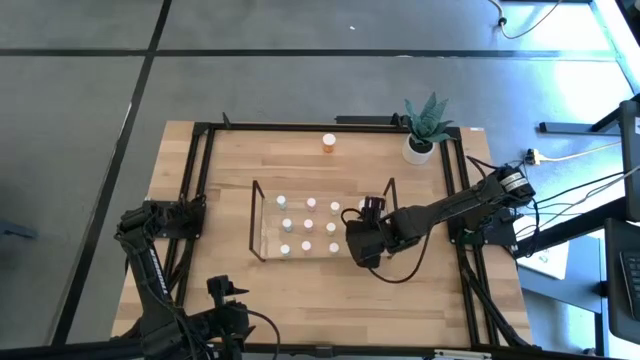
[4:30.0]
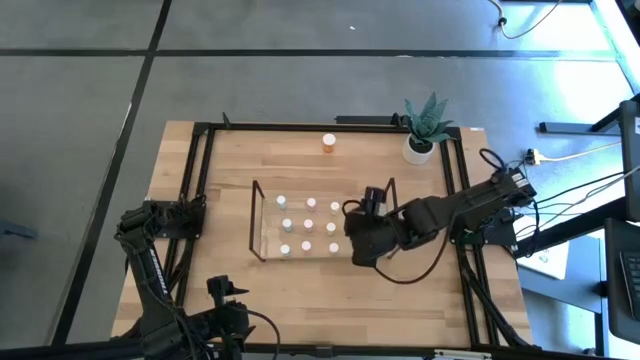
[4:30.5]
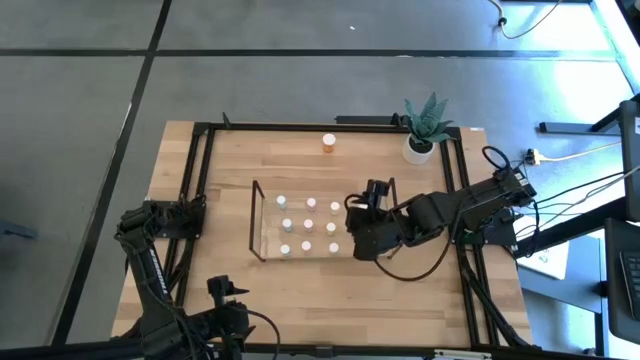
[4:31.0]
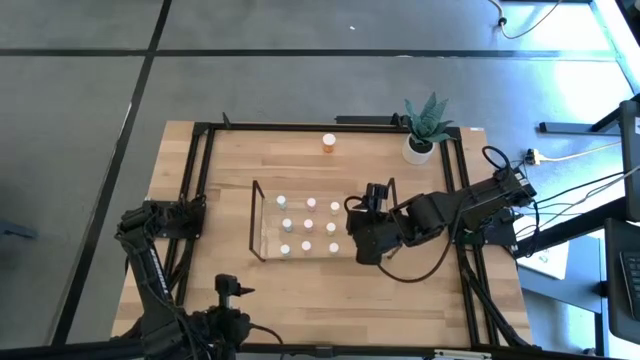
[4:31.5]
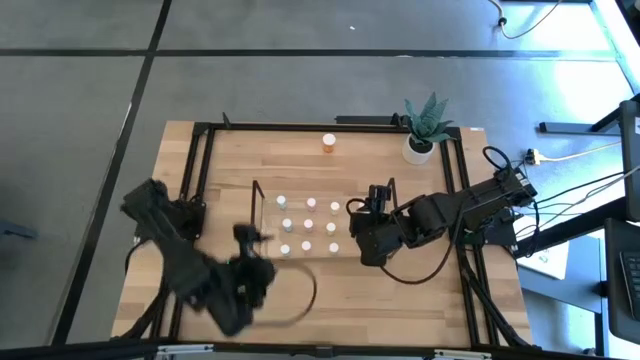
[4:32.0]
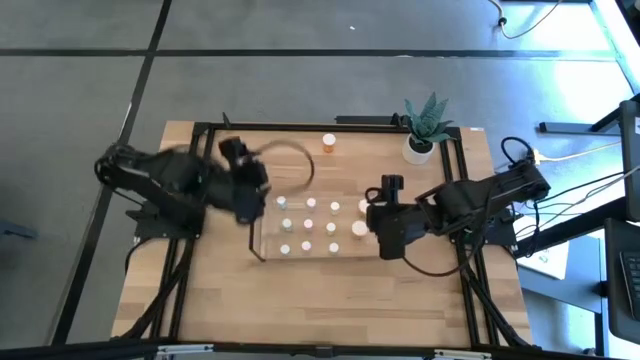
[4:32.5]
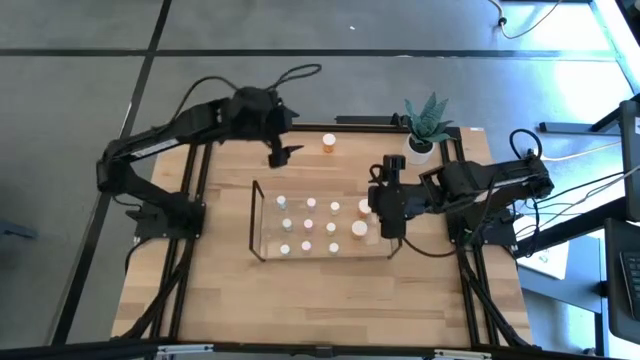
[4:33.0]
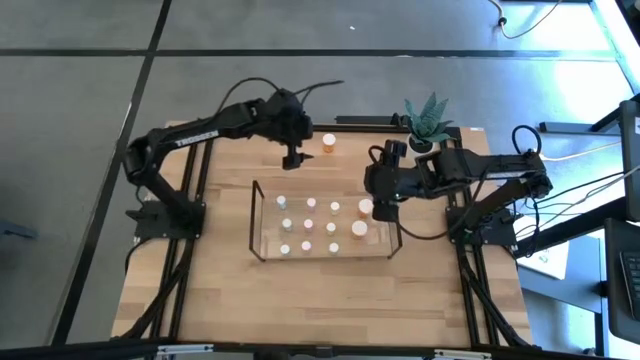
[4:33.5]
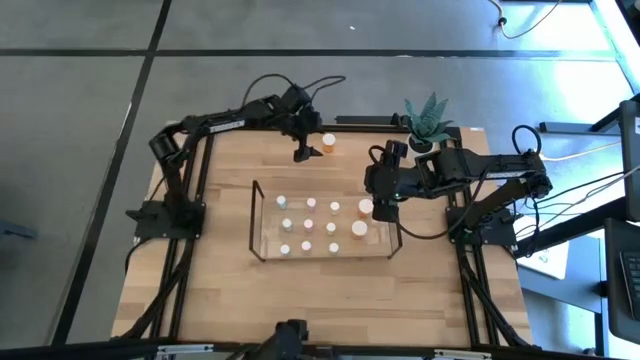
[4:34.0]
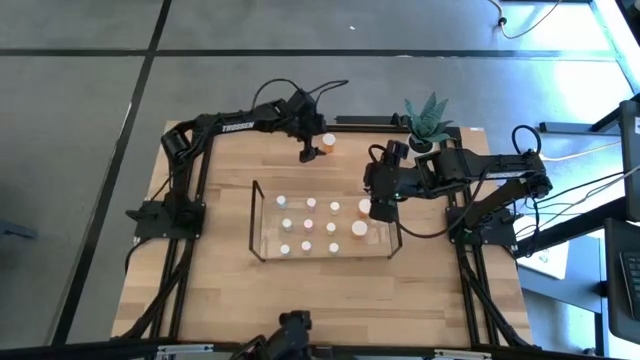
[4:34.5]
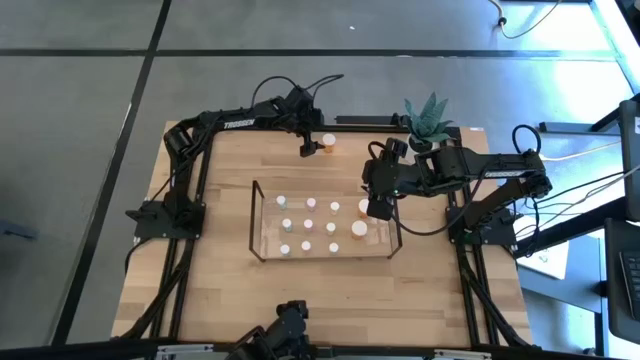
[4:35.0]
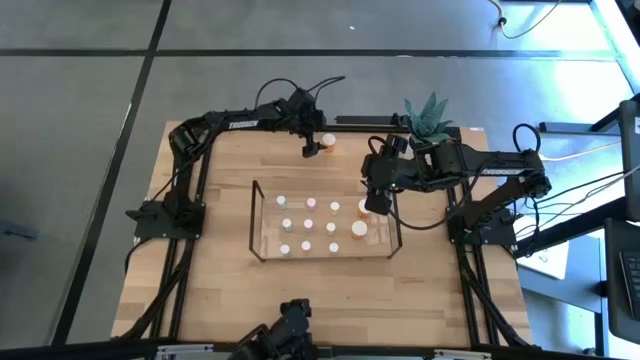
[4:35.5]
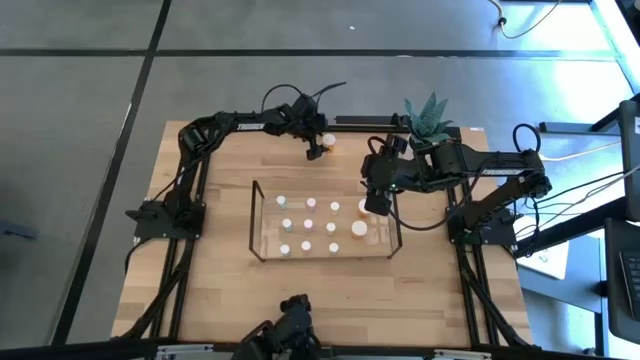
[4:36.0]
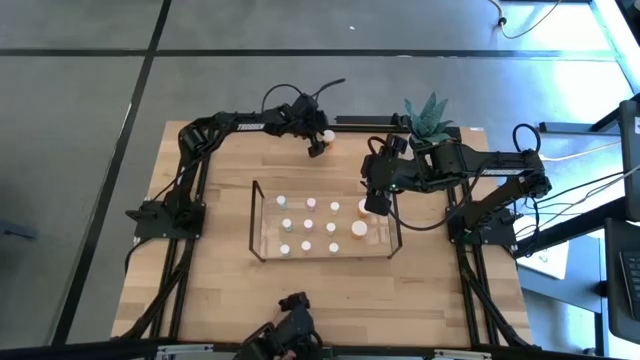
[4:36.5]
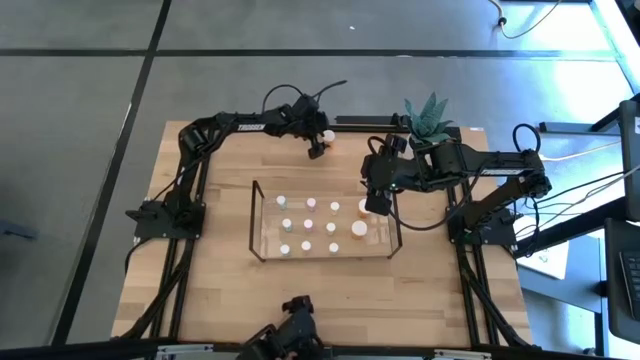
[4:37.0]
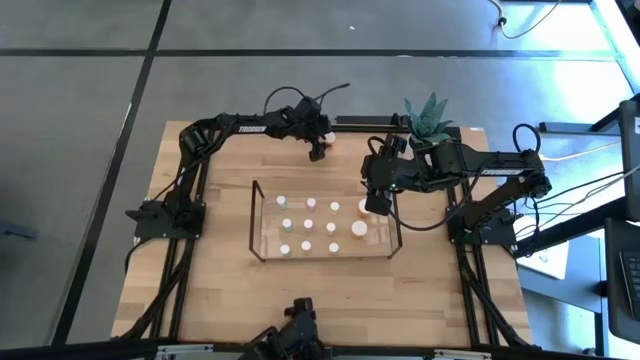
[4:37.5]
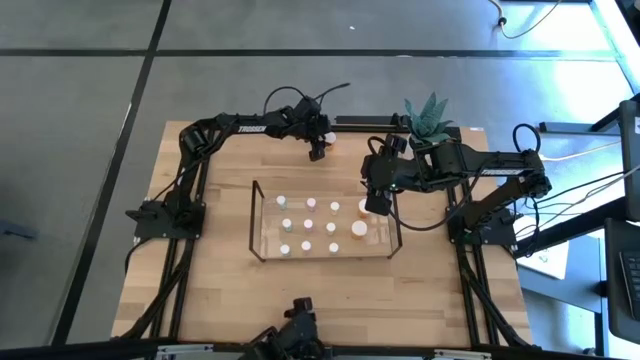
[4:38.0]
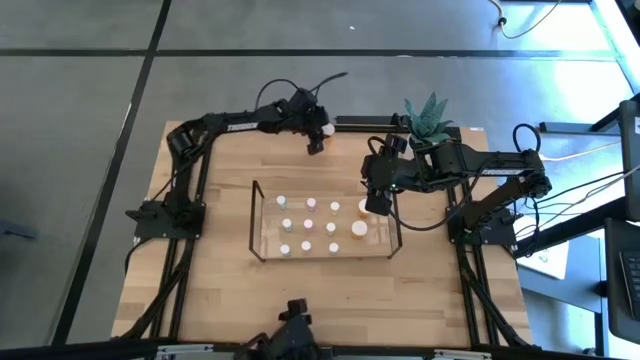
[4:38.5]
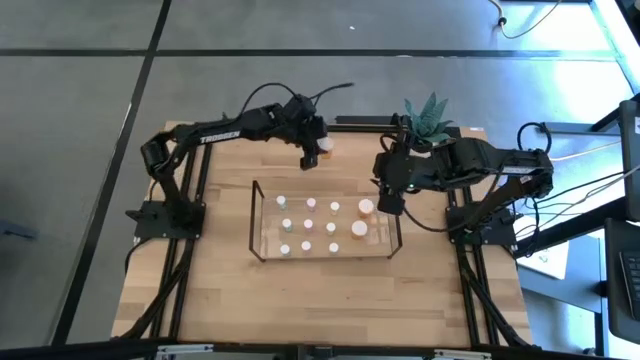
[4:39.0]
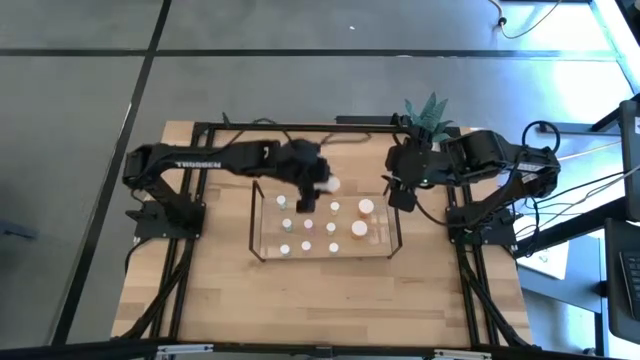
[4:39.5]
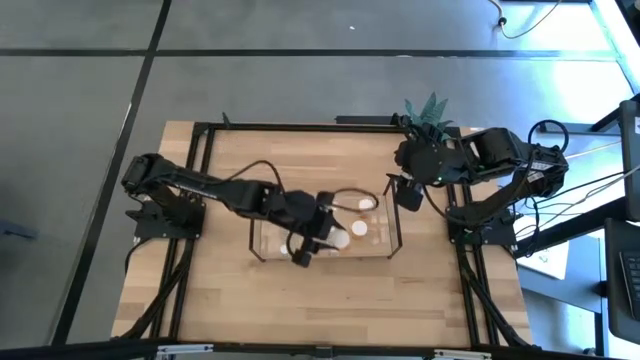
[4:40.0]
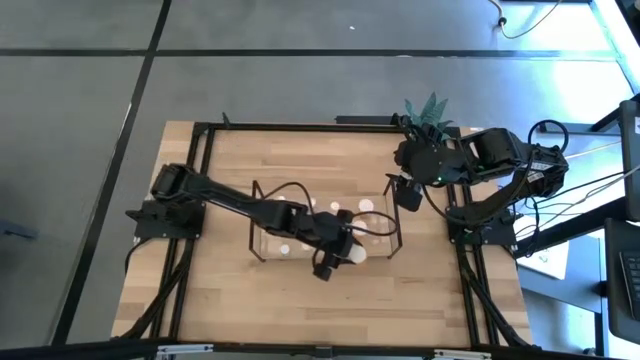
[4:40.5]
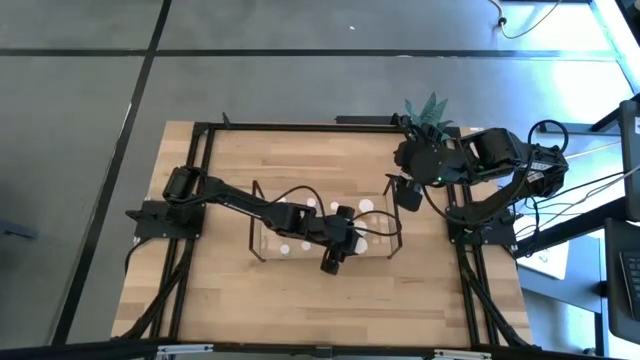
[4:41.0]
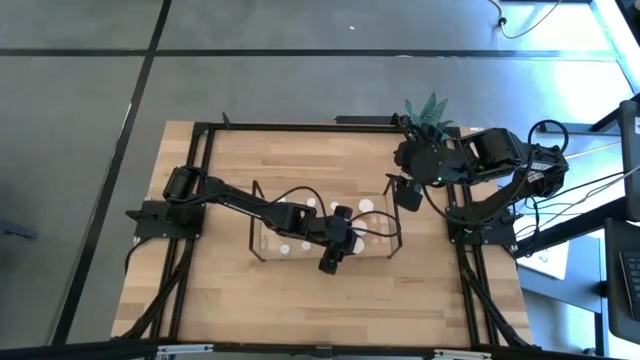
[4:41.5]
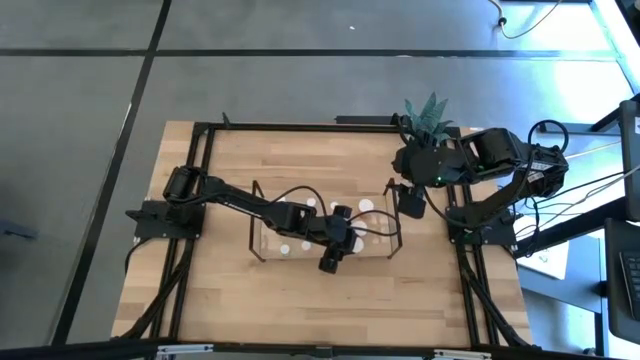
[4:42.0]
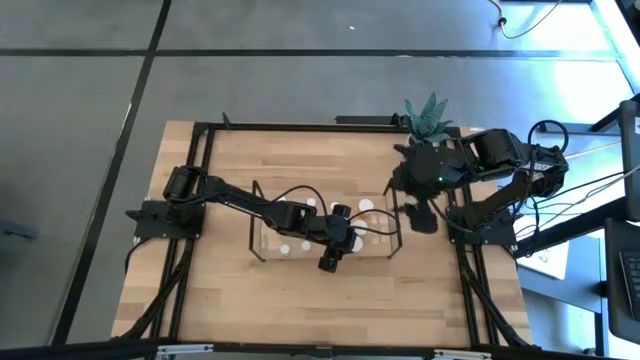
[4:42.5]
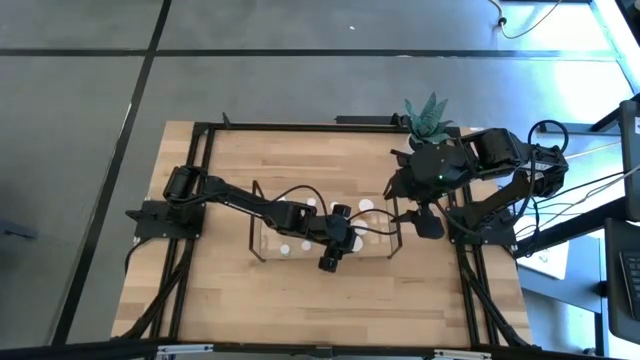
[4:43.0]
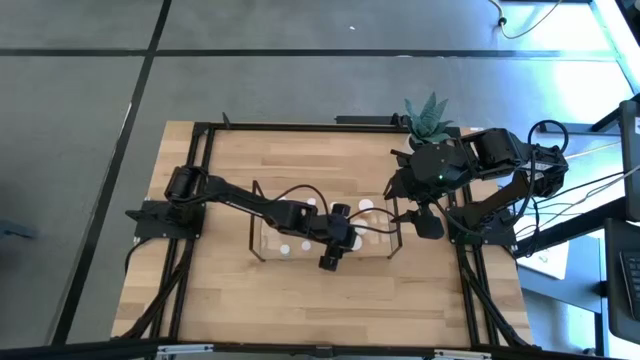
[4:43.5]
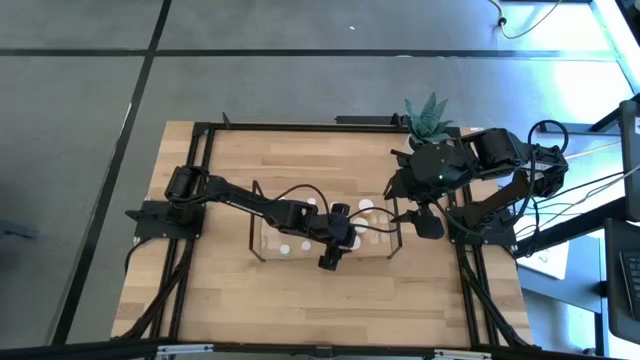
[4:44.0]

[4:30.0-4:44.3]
Task: Pick and place medicine bottles onto shelf by color
Put the orange pill bottle on the shelf aligned with the other orange pill bottles

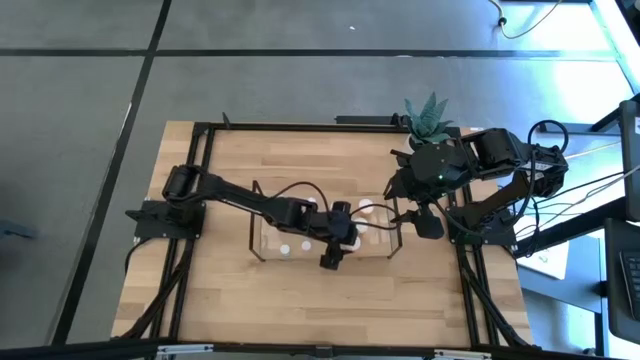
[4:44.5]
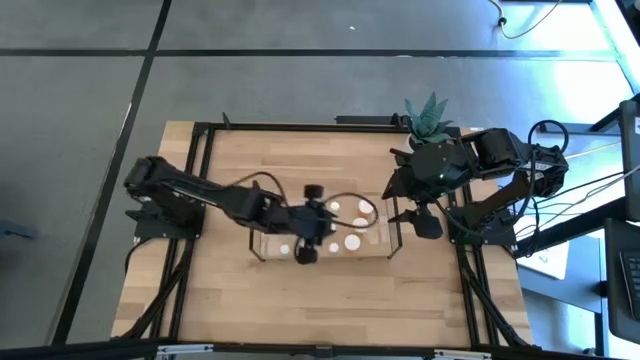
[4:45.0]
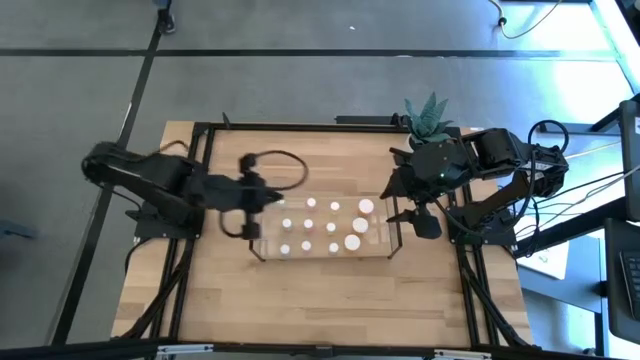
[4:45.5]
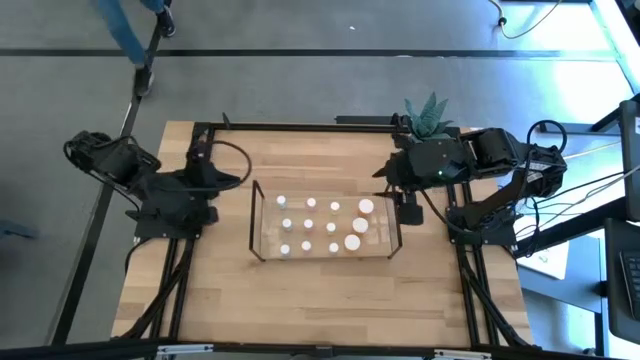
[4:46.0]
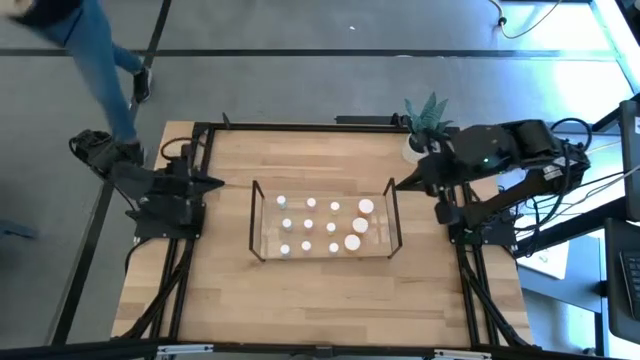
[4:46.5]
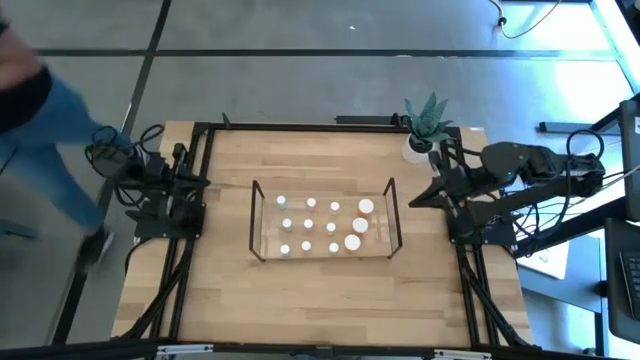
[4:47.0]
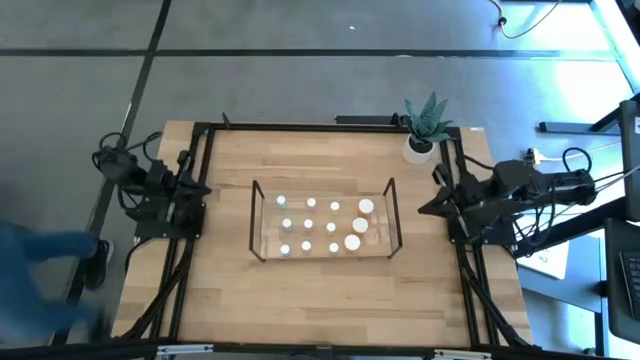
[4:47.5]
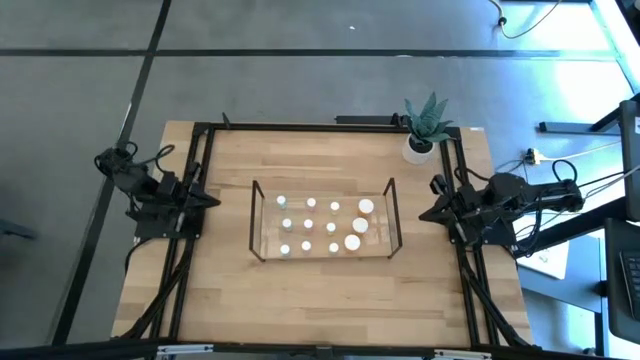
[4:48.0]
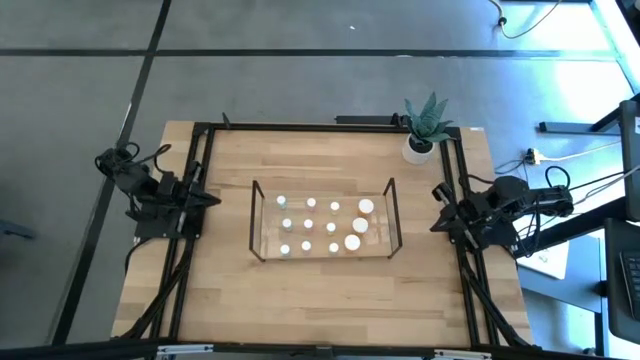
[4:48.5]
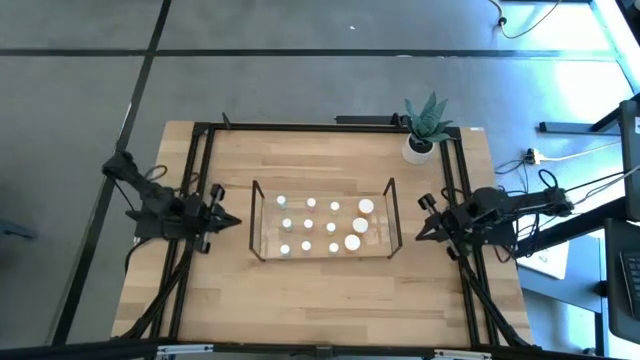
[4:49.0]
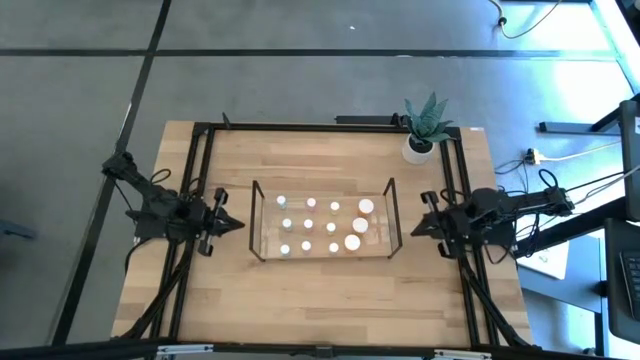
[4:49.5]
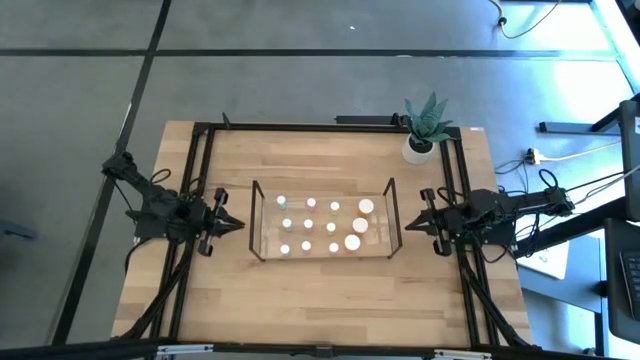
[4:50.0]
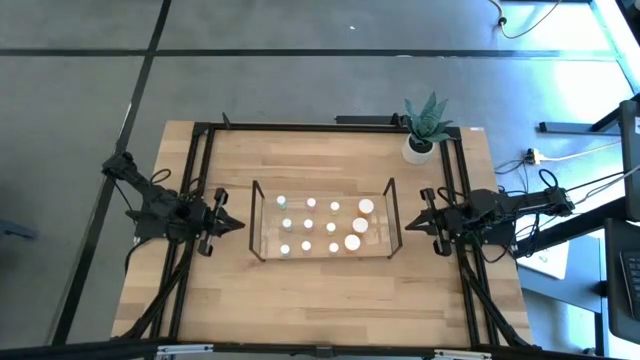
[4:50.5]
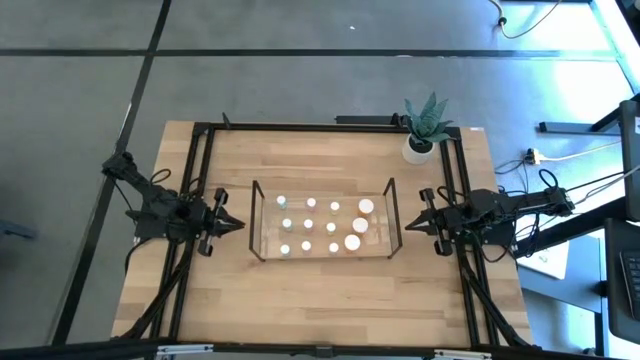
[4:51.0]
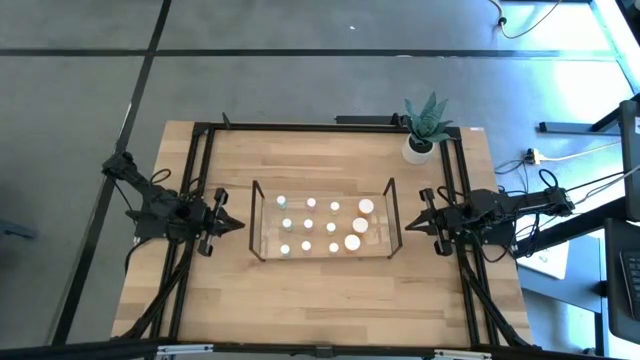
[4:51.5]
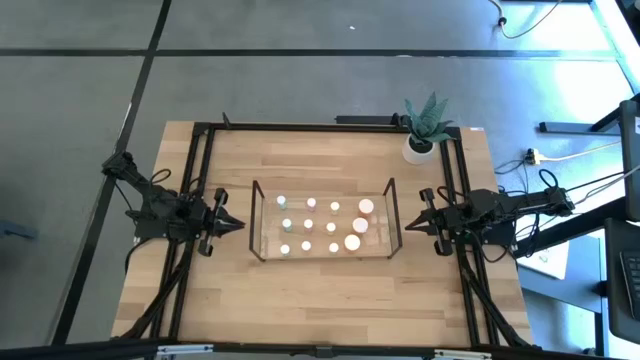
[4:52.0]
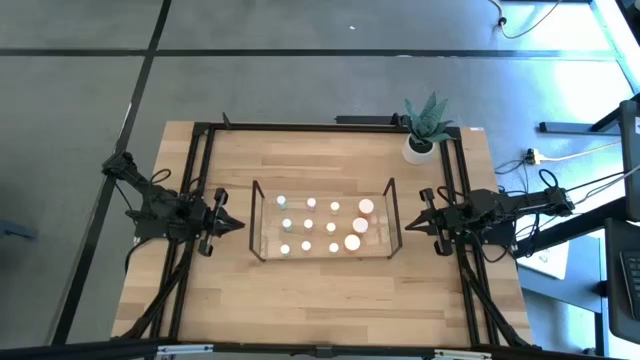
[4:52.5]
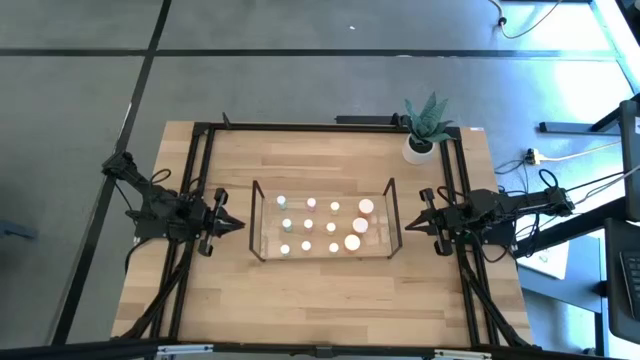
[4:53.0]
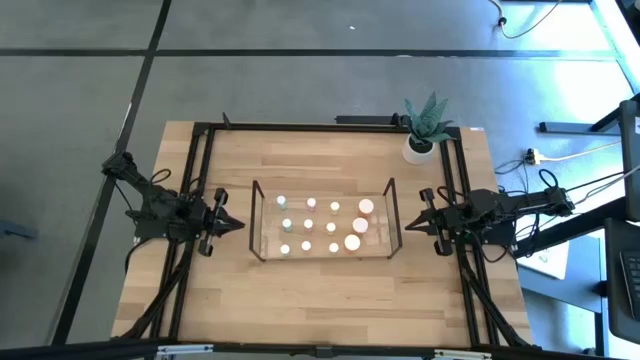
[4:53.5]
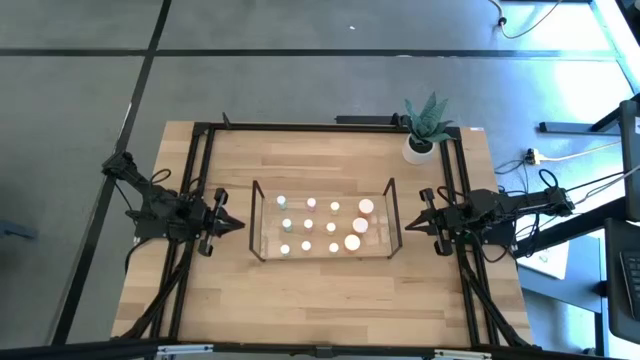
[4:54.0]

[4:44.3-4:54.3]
Return to Home Position
